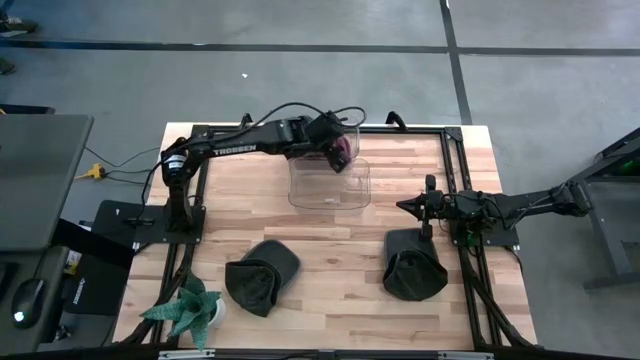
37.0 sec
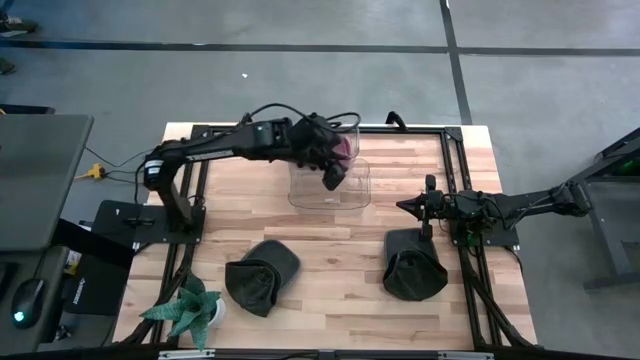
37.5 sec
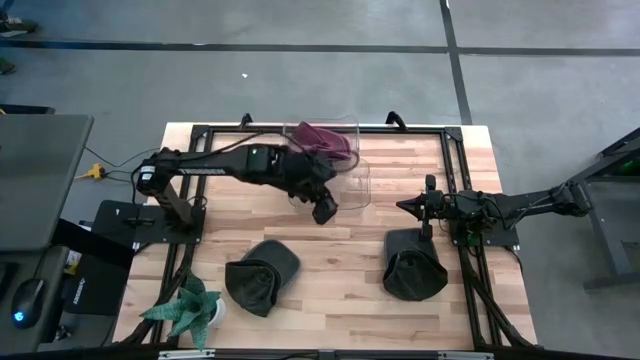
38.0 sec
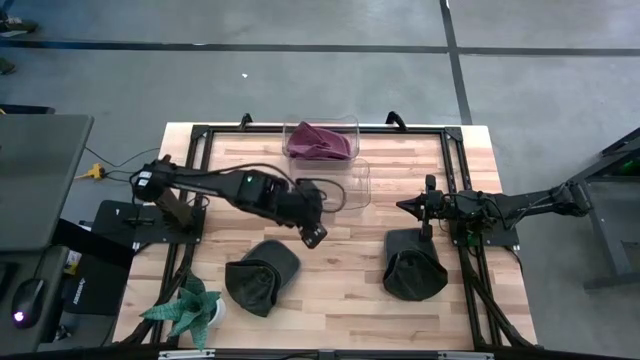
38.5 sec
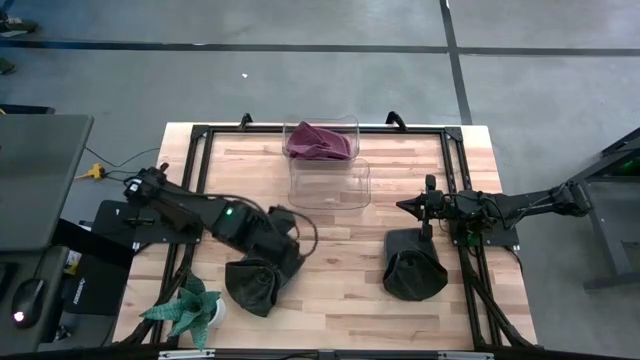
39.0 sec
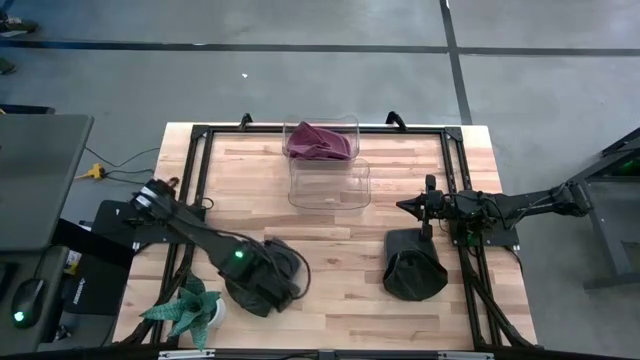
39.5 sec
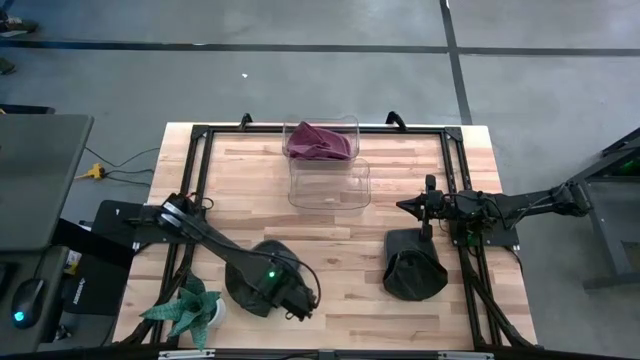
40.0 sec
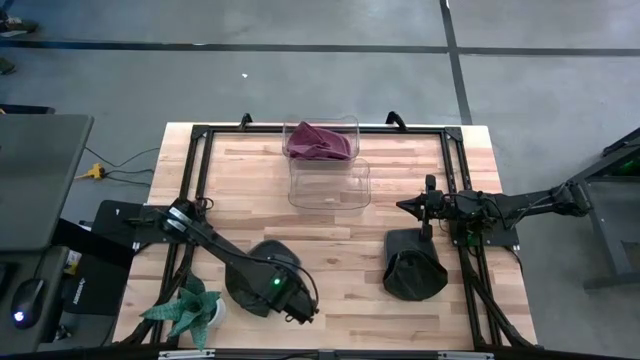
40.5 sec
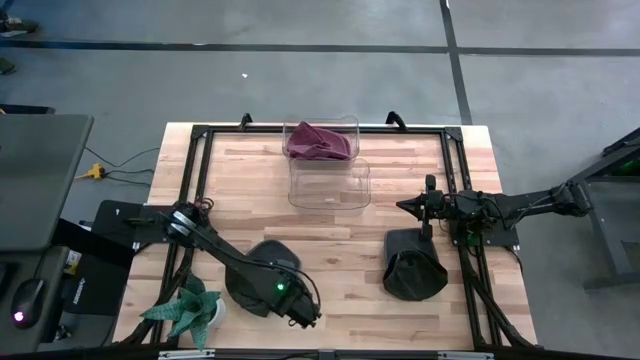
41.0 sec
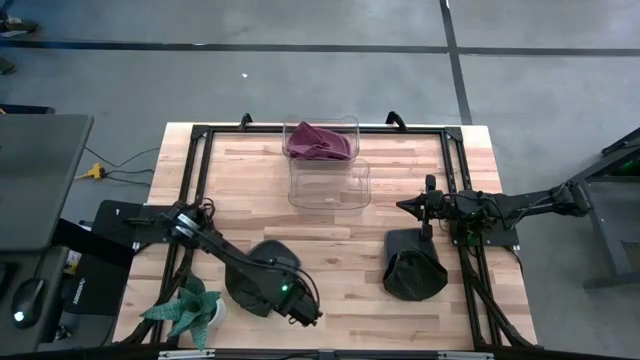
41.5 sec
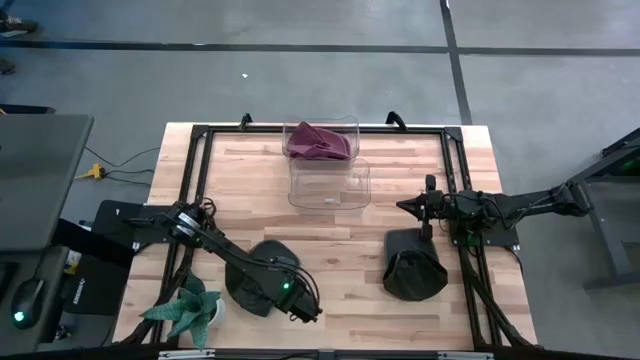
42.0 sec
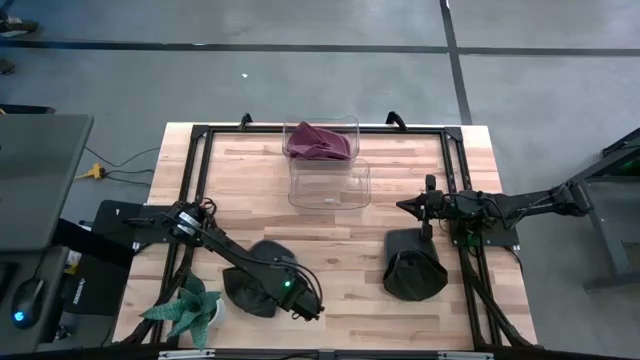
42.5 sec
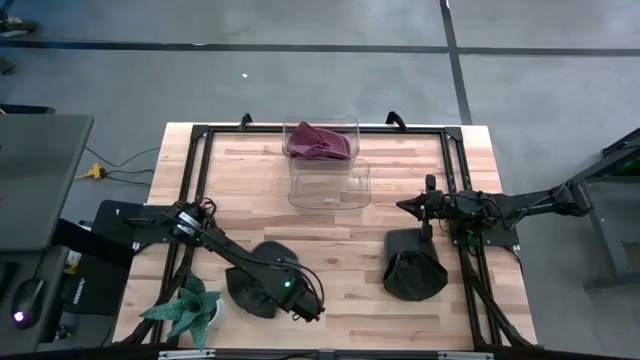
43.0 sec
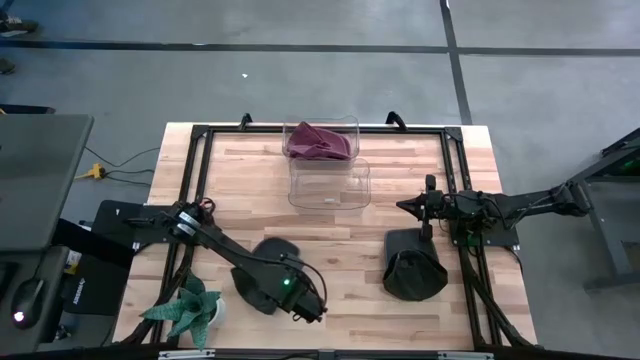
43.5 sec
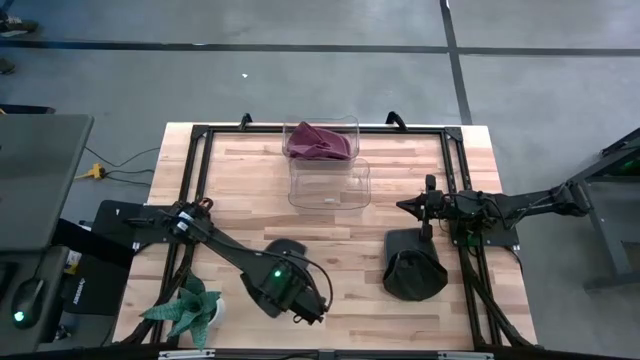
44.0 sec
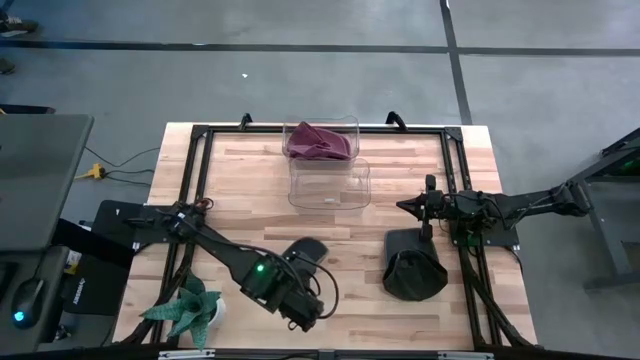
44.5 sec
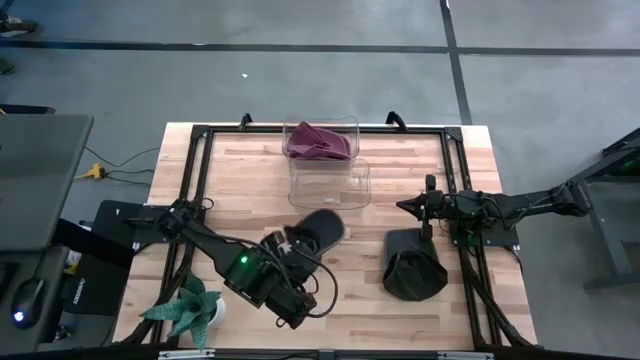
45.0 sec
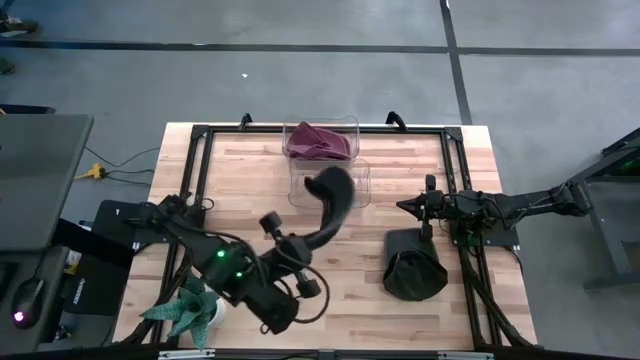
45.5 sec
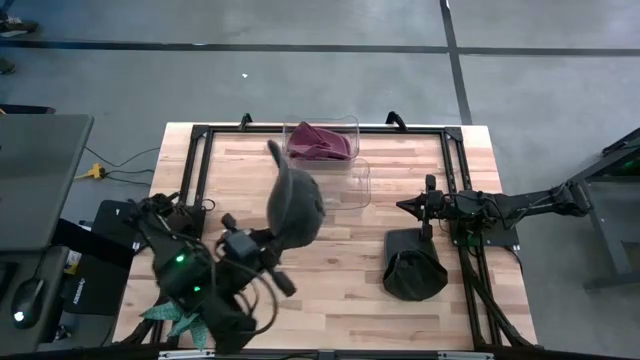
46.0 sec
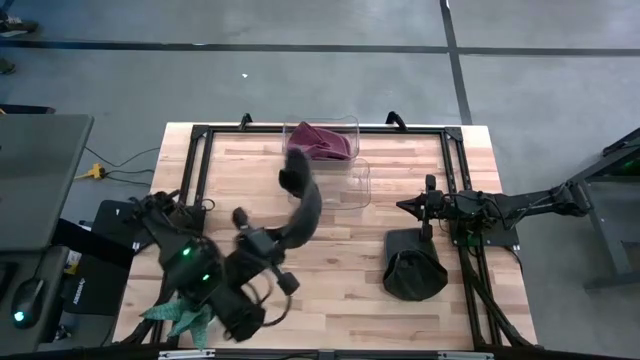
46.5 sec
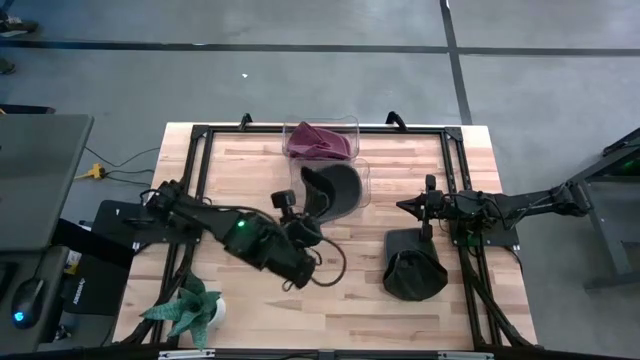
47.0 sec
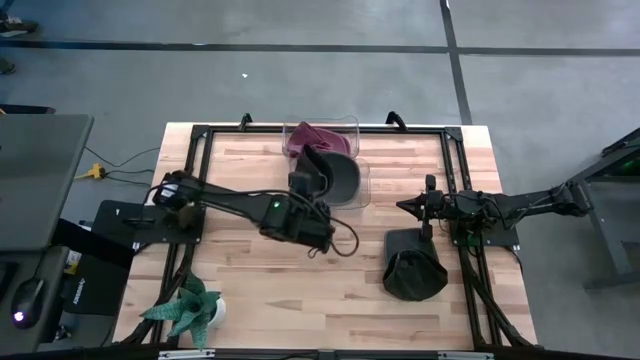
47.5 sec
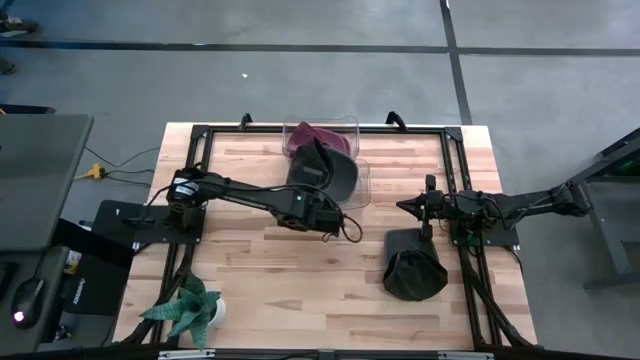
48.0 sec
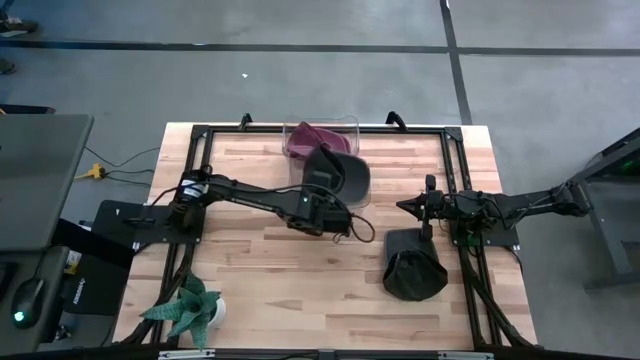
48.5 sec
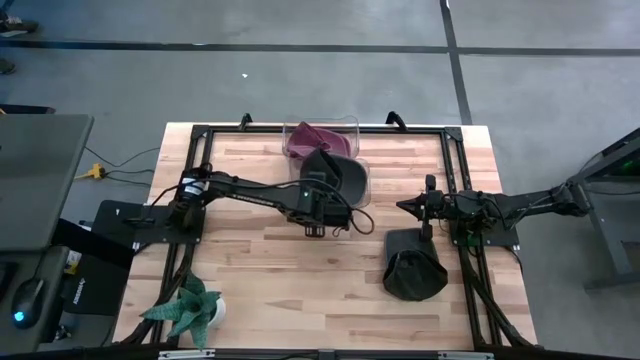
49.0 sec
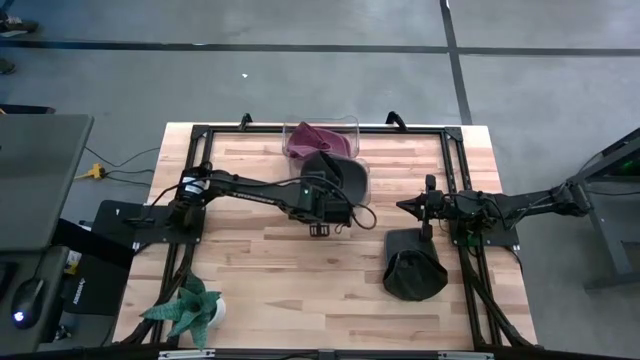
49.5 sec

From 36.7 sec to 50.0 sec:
Task: Pick & Place hat
Put the black cap into the bottom transparent bin

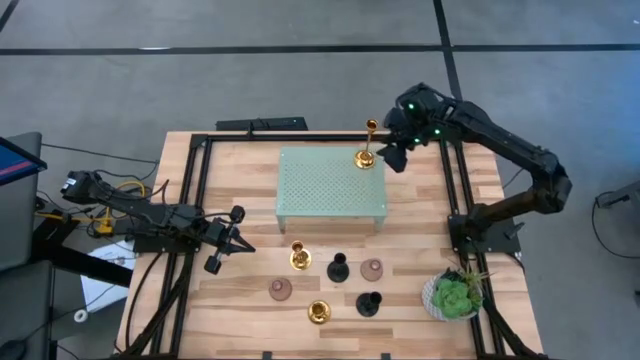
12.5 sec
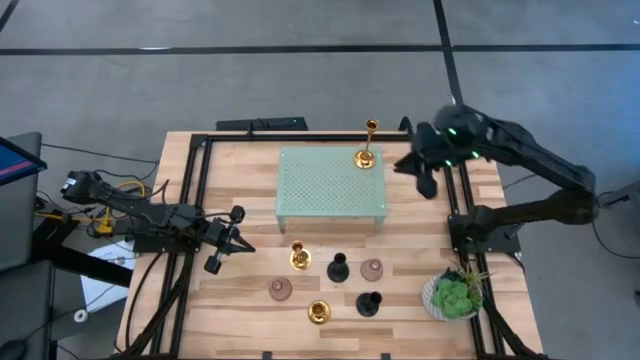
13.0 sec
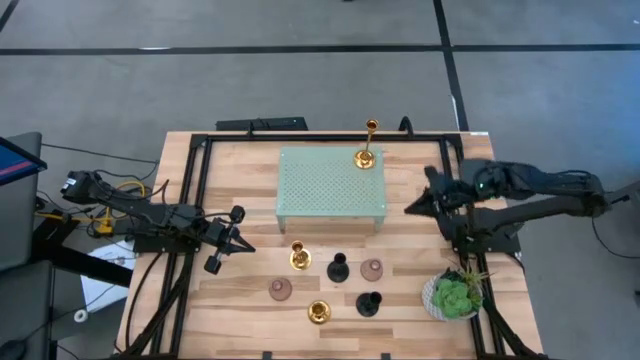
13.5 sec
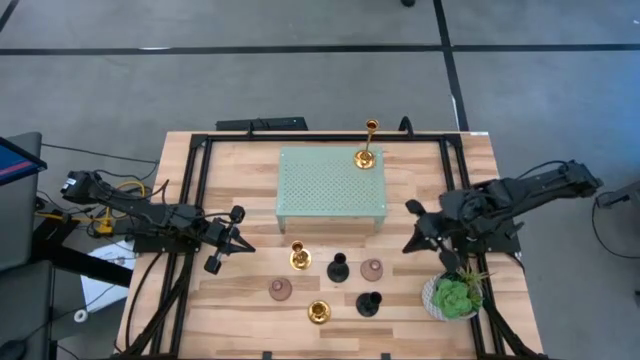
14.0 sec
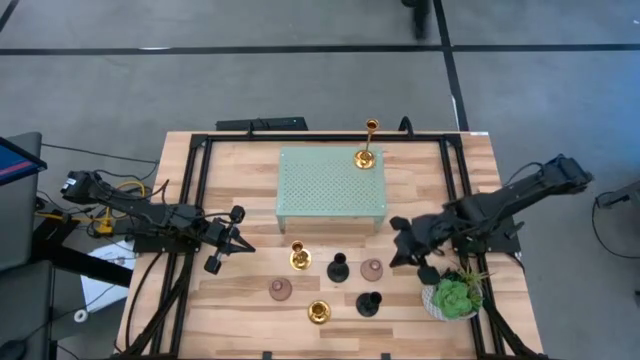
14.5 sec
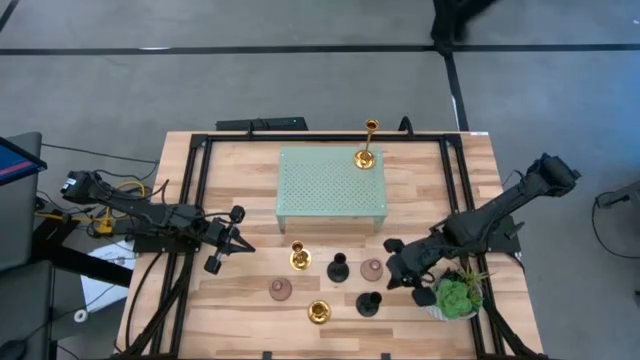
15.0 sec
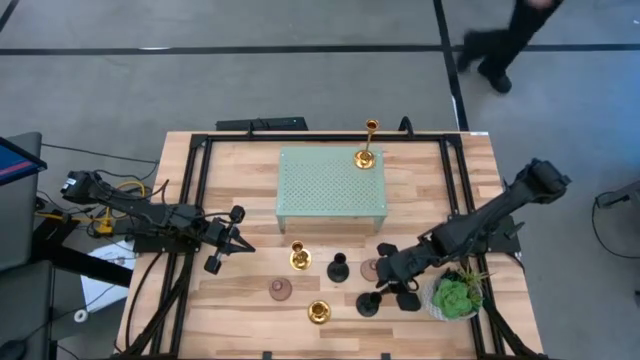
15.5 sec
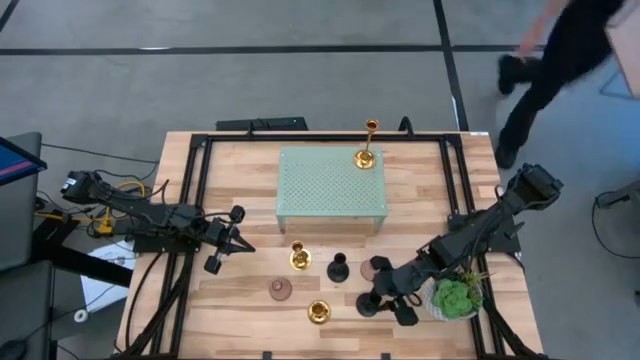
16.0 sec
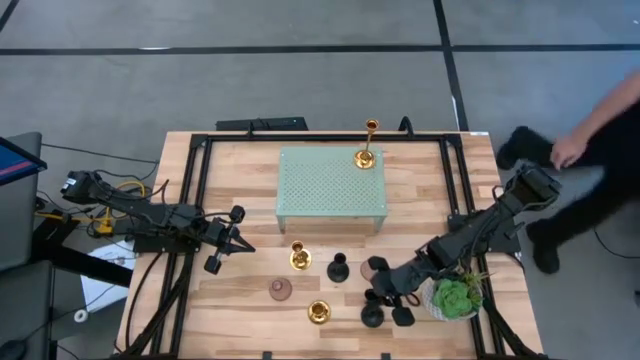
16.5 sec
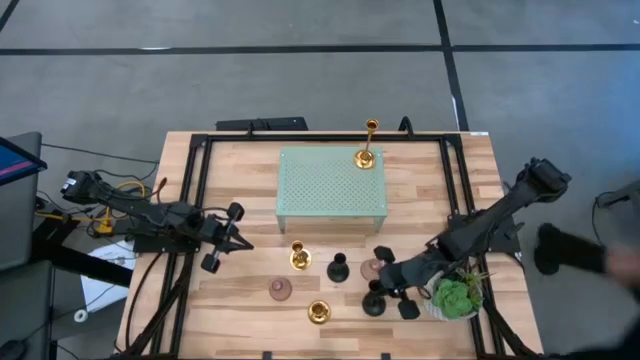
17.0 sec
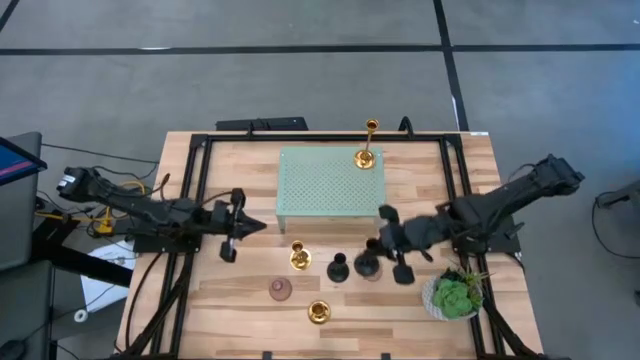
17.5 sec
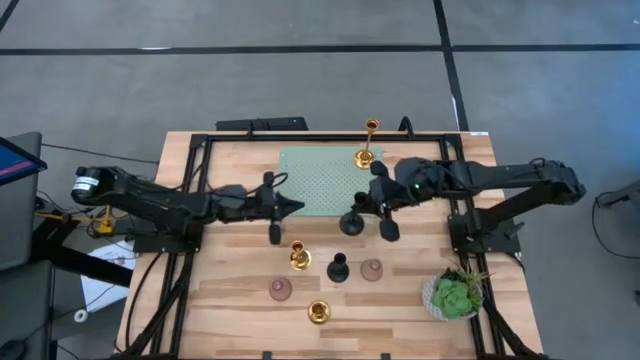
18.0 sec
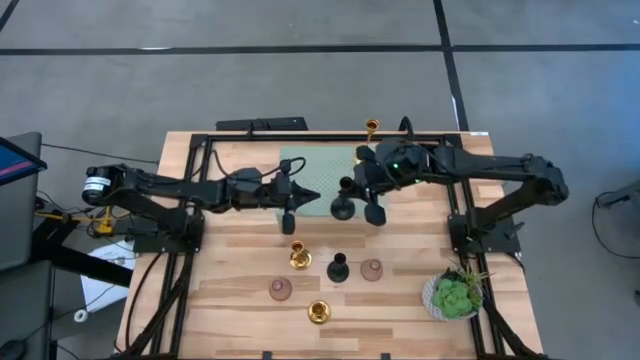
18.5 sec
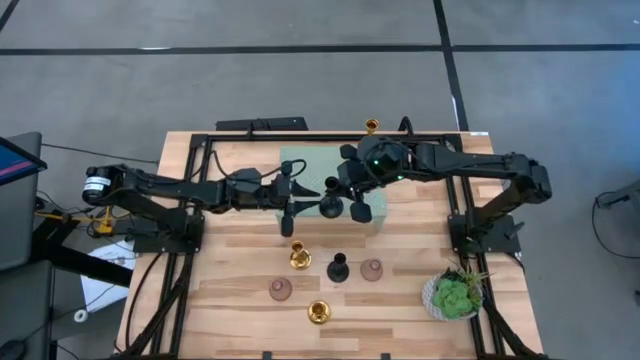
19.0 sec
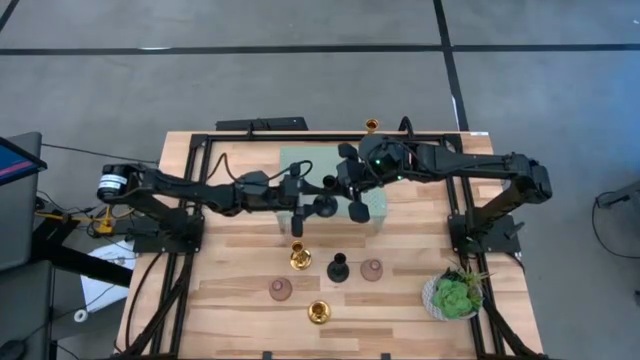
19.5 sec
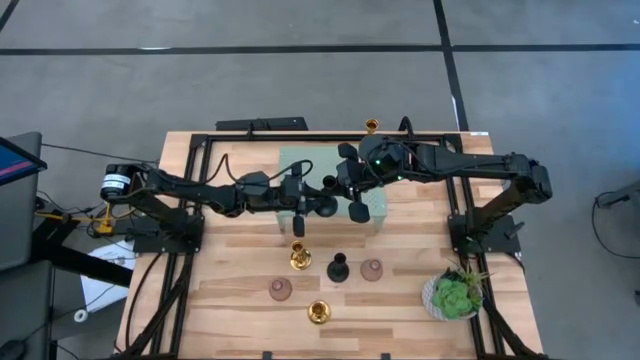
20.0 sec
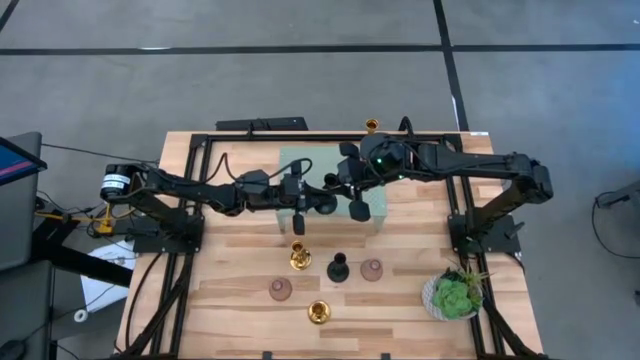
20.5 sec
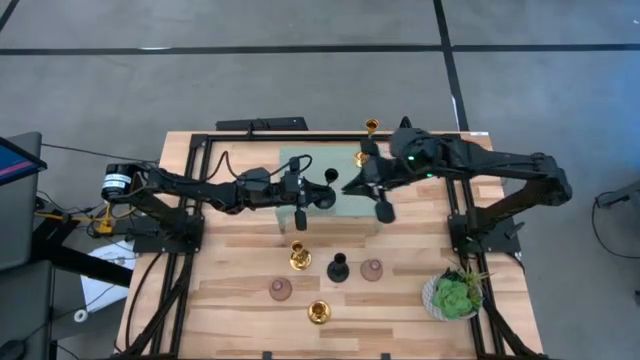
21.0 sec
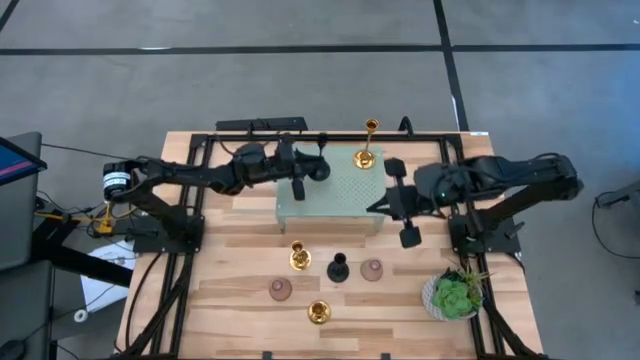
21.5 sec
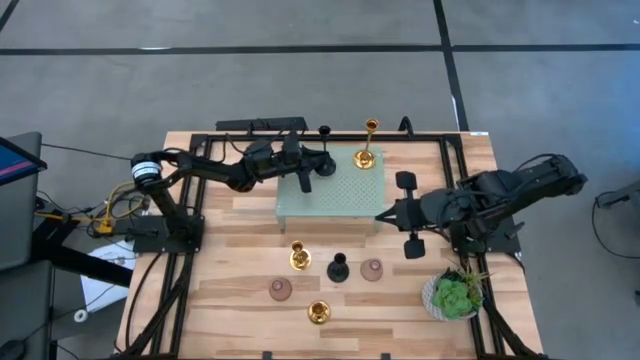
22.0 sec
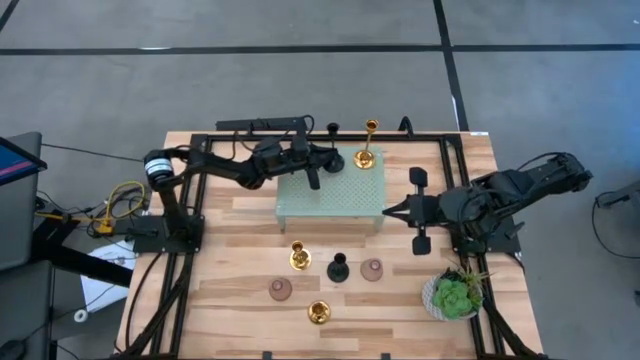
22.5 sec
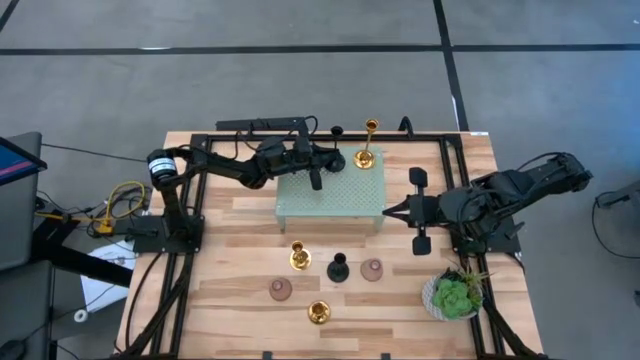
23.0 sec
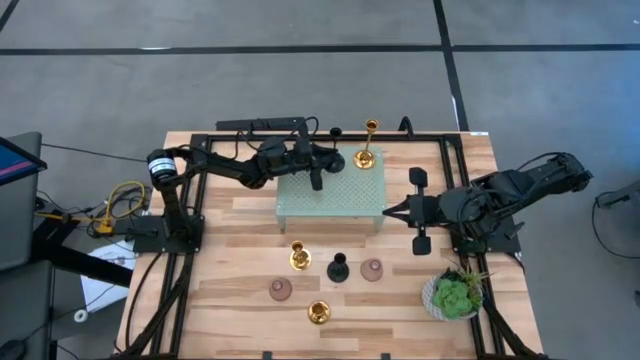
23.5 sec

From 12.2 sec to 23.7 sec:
Task: Pick & Place candle stick holders
Put the bottom black candle holder on the shelf
